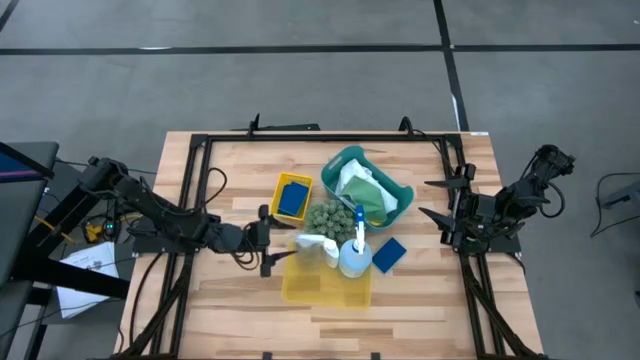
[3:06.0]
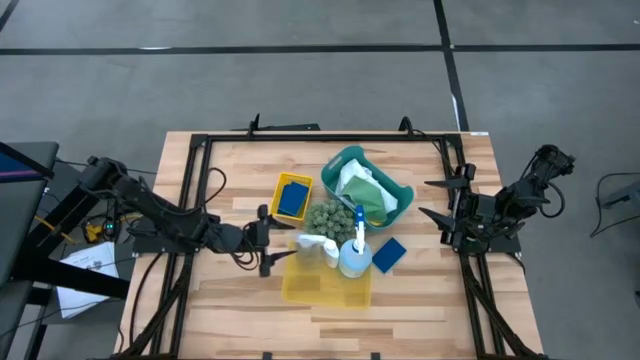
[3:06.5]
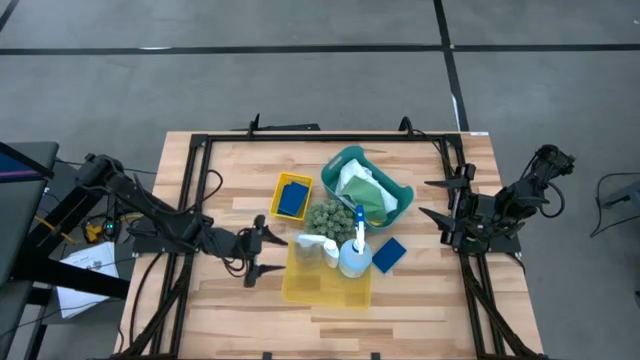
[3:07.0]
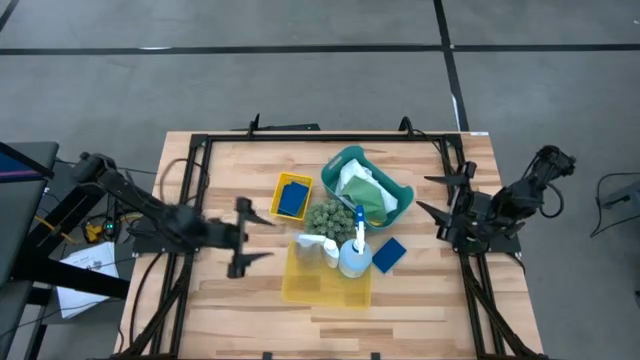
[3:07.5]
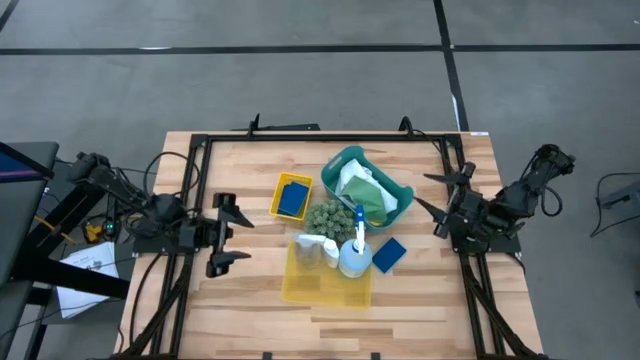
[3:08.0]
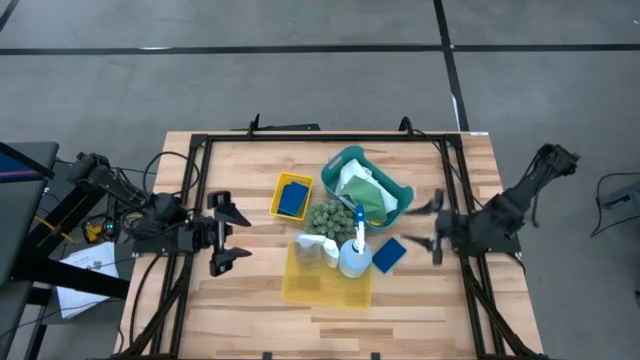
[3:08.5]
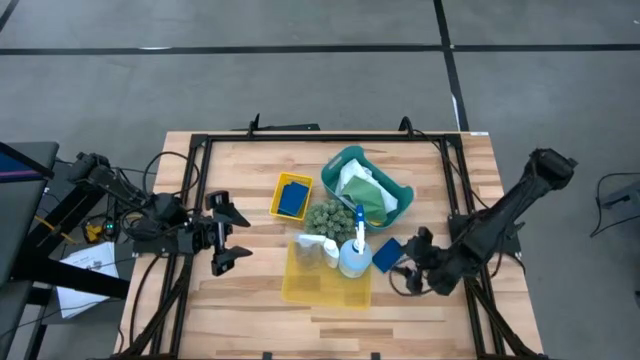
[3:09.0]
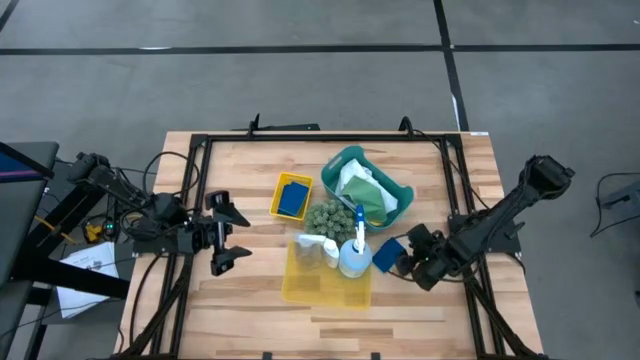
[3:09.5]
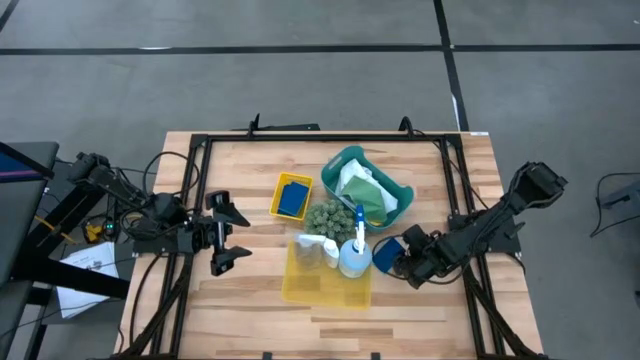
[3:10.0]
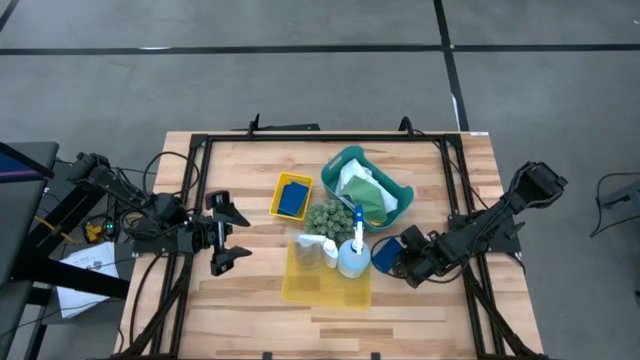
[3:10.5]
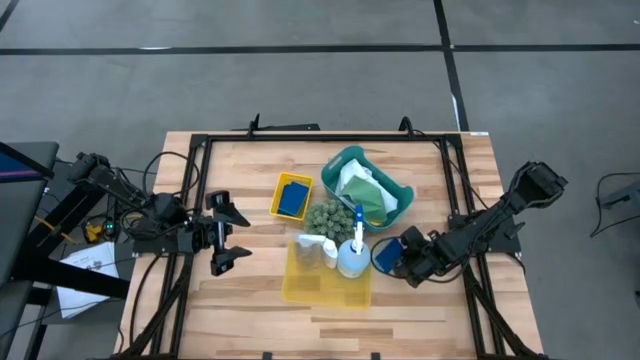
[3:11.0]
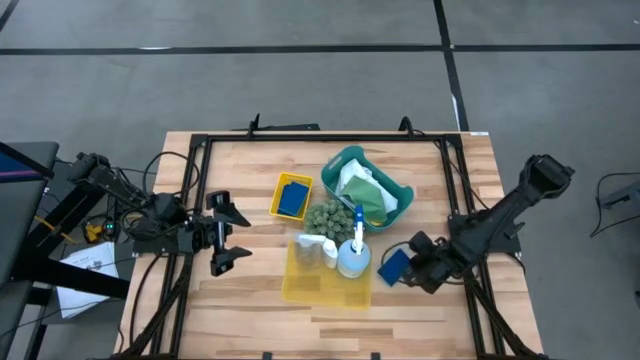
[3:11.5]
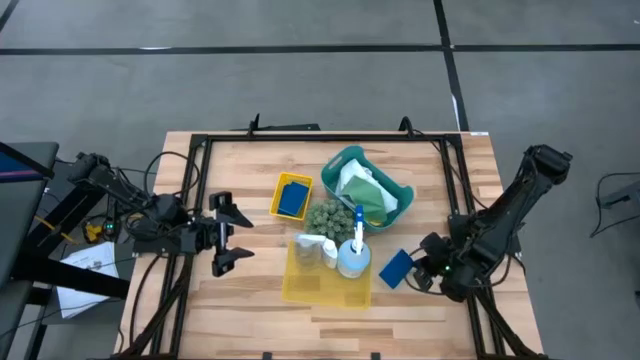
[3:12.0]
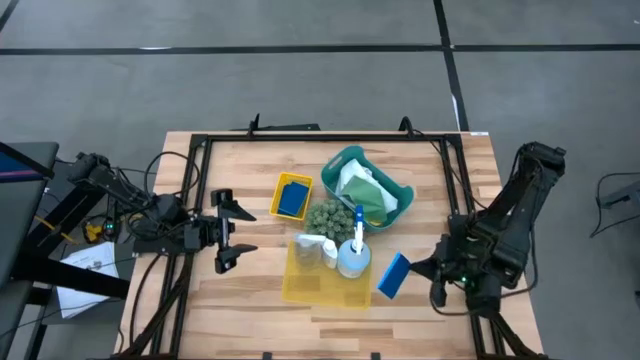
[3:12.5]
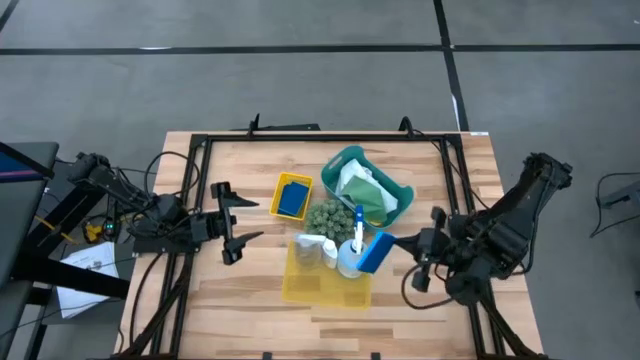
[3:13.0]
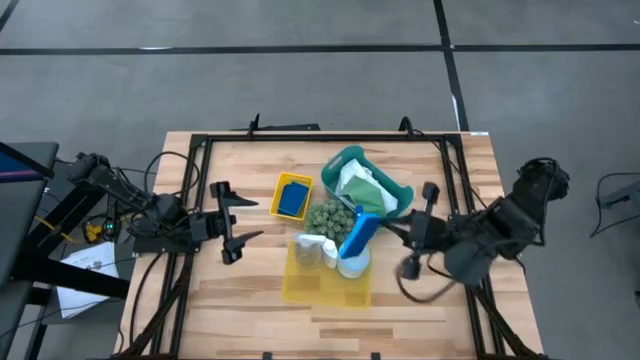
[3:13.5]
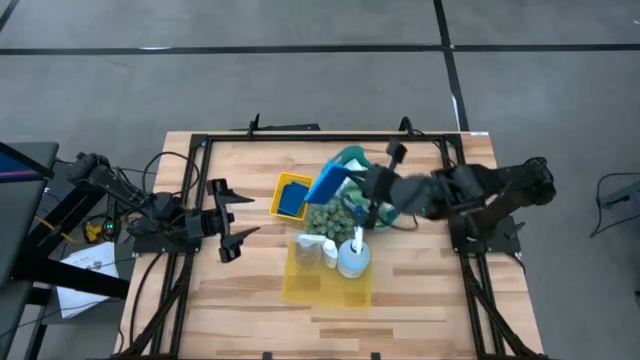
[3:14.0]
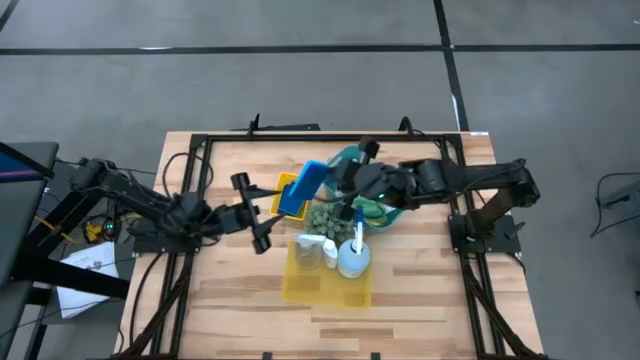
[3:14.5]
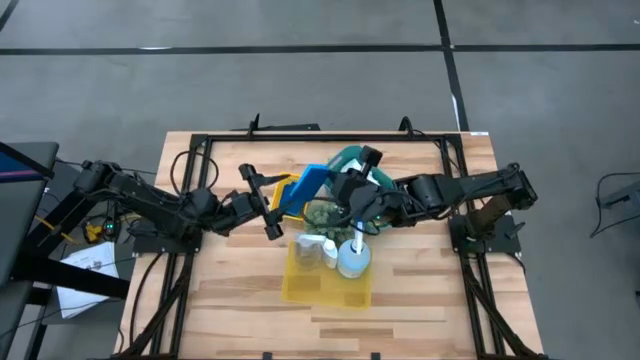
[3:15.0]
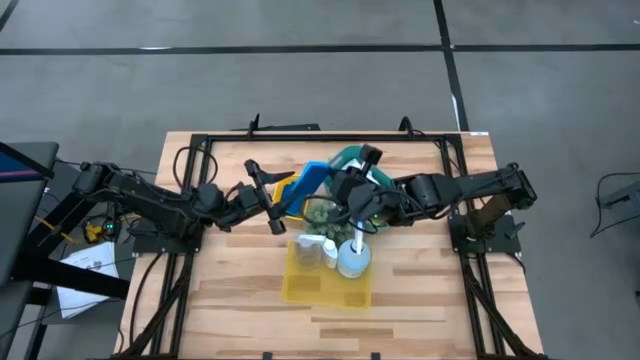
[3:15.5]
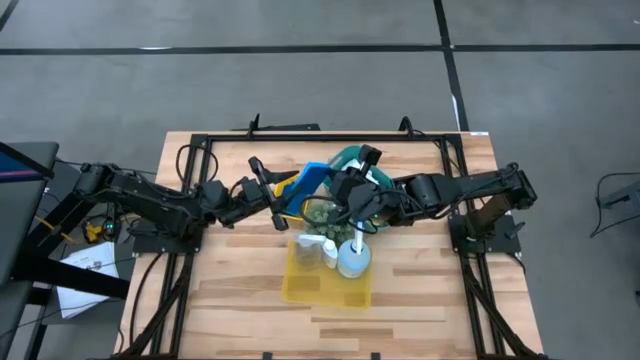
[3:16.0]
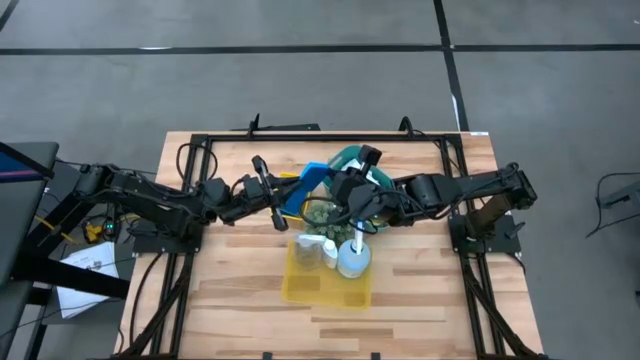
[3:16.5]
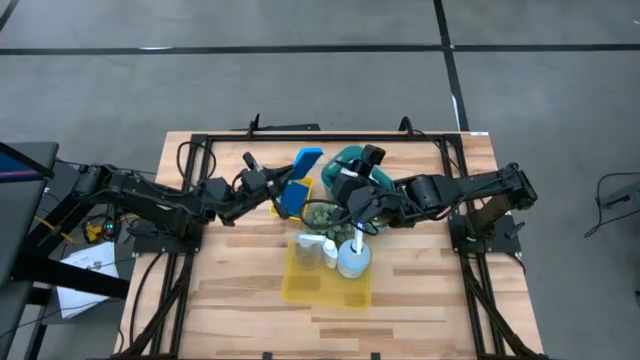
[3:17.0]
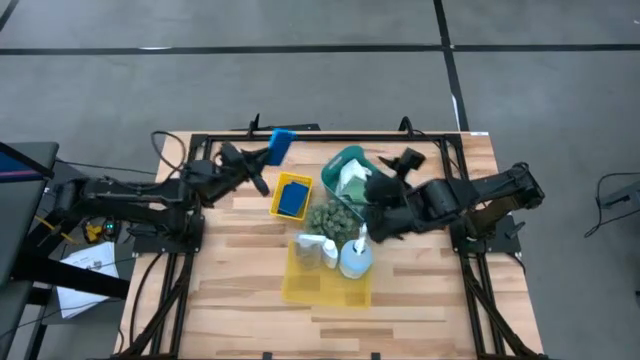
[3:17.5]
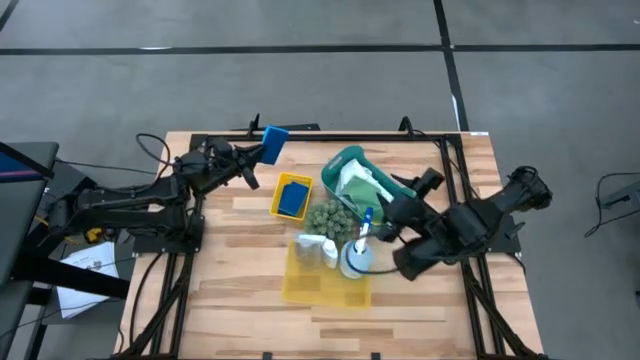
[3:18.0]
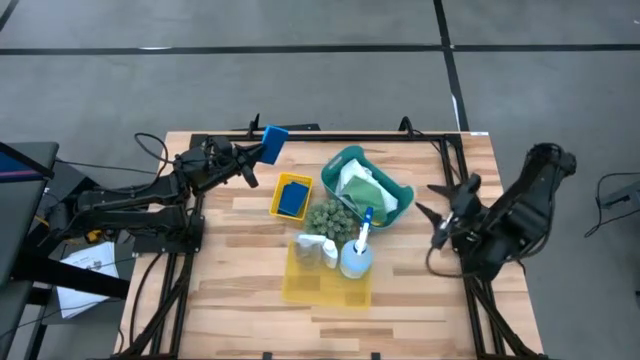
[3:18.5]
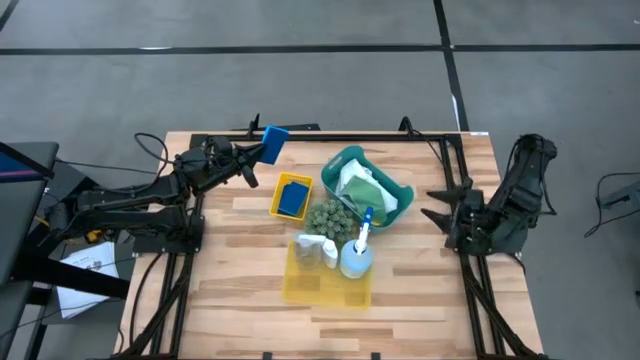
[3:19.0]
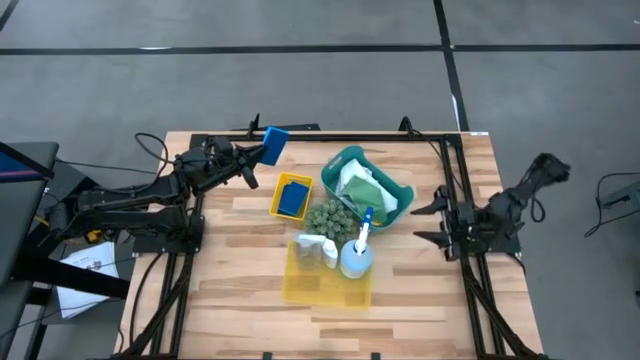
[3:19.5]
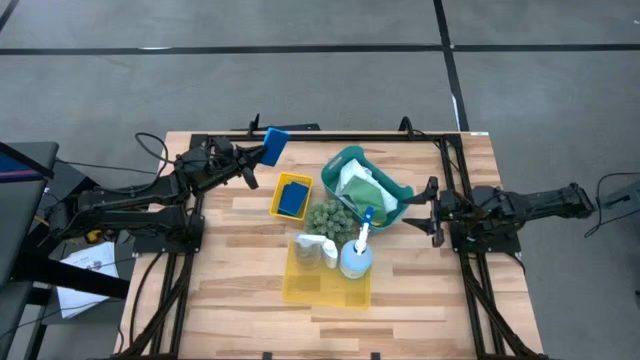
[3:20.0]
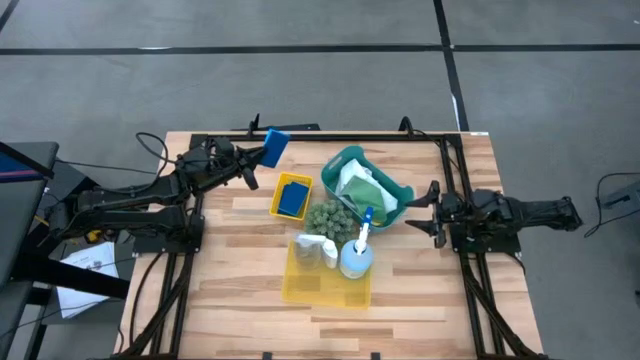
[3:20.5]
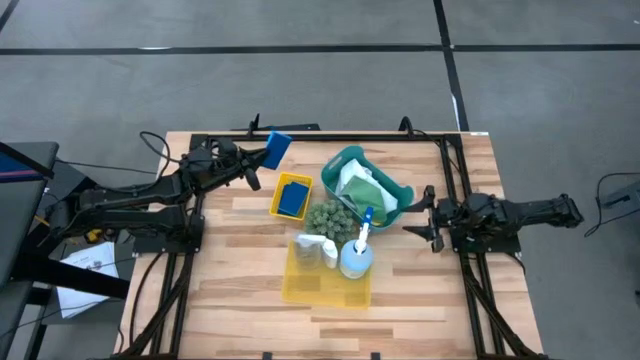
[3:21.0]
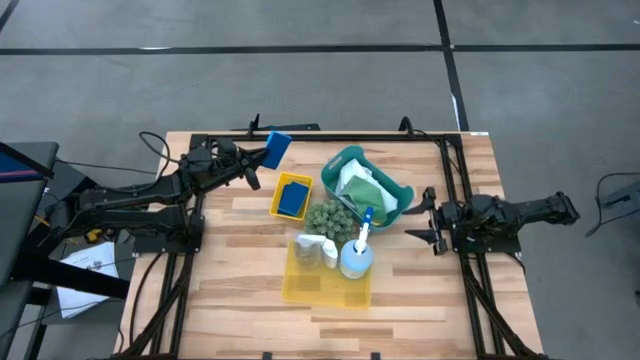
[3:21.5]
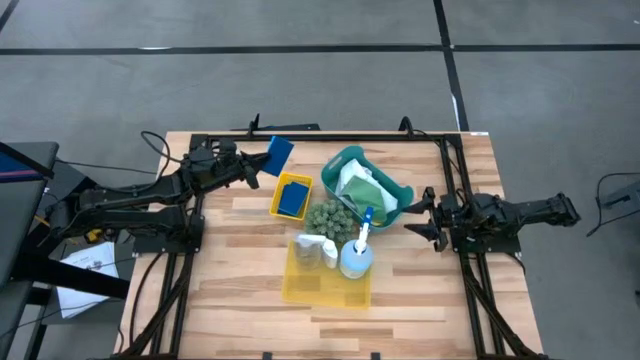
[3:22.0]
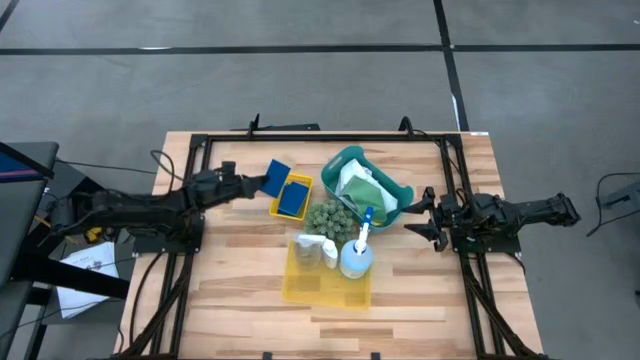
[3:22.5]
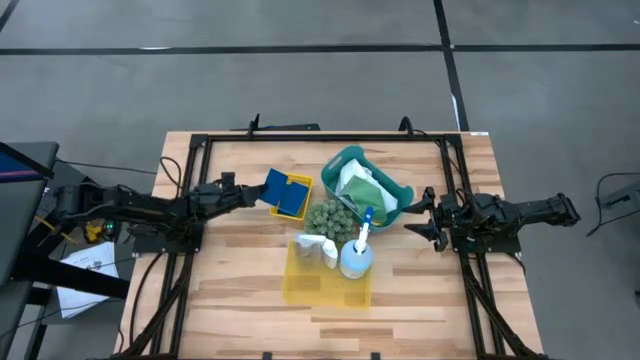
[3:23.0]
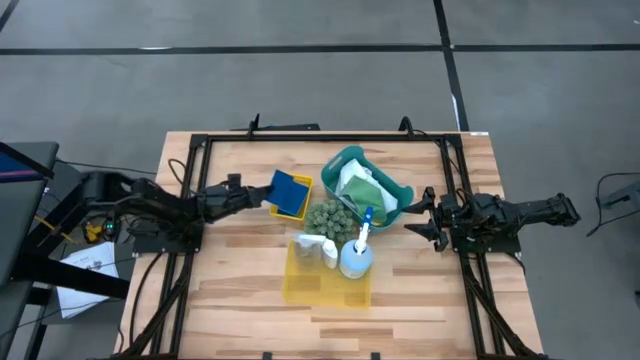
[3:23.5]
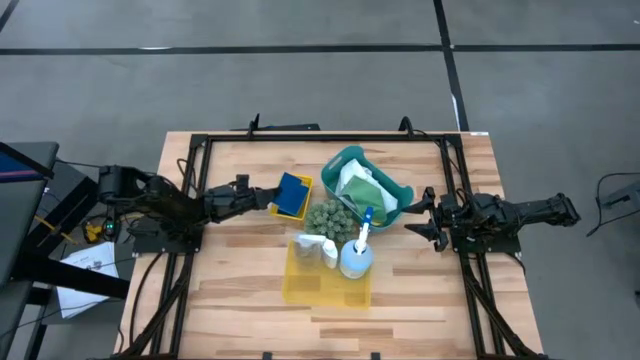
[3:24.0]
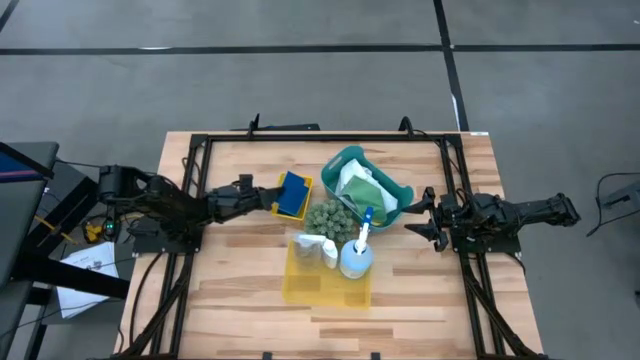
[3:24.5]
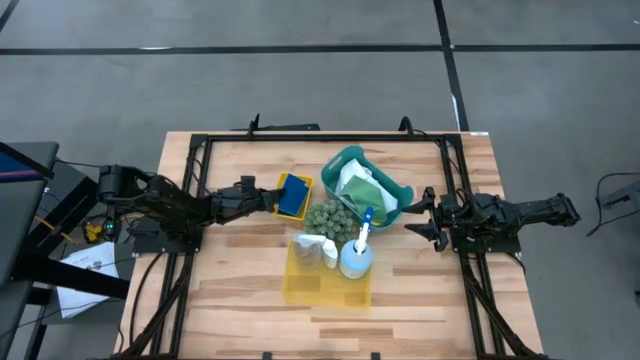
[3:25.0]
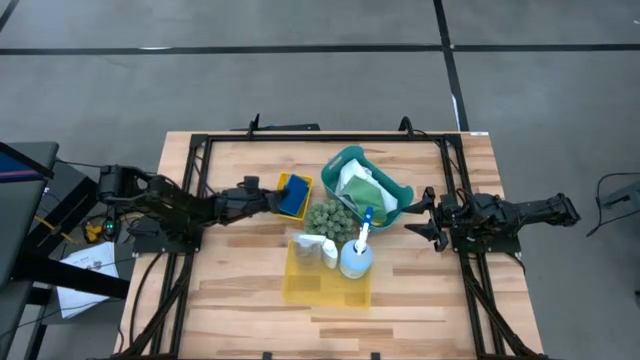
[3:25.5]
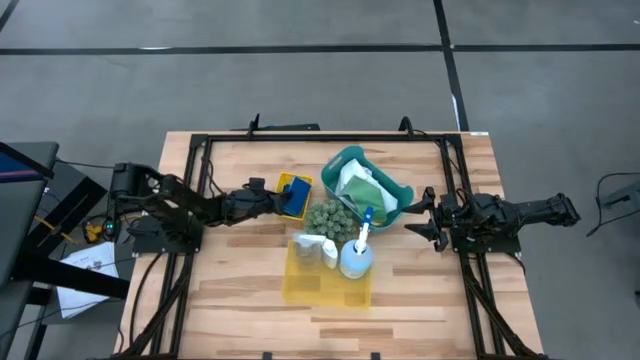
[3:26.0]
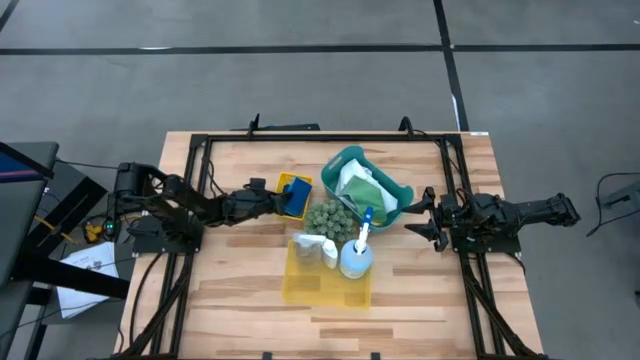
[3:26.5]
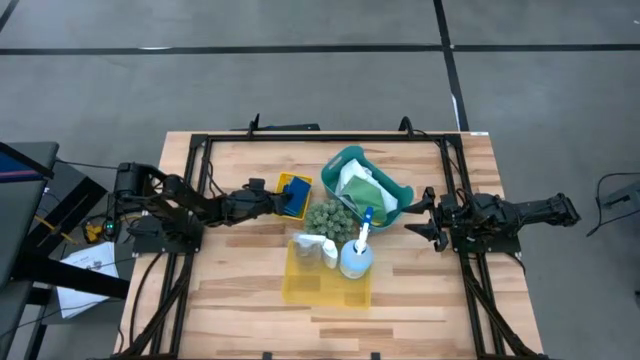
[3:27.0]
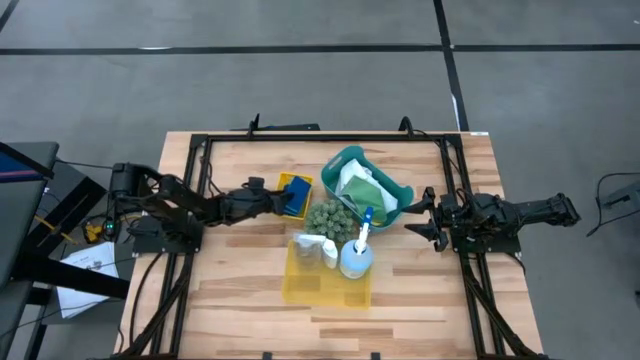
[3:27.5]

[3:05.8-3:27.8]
Task: Pick & Place Kitchen Items
Put the blue sponge into the top yellow bin
